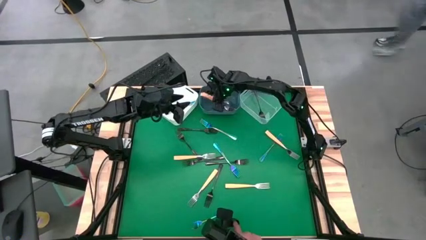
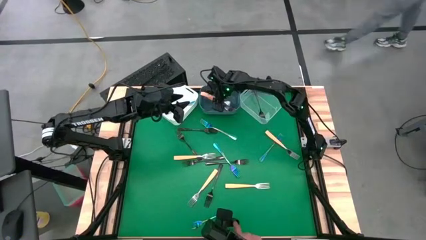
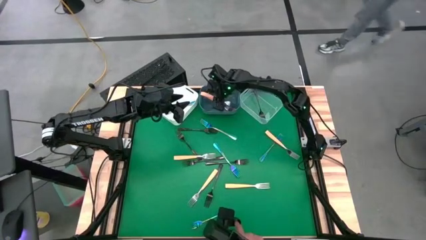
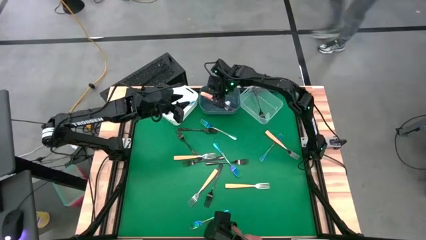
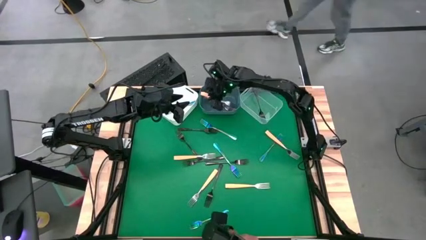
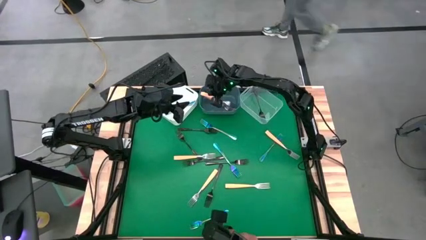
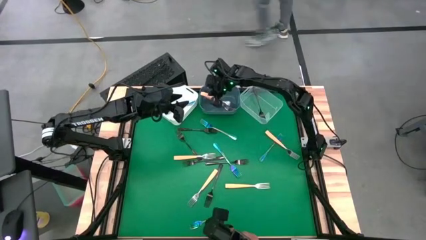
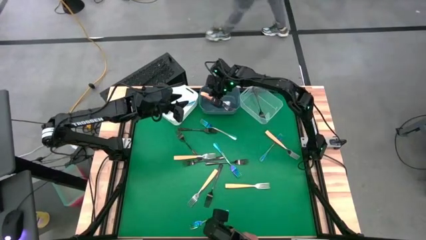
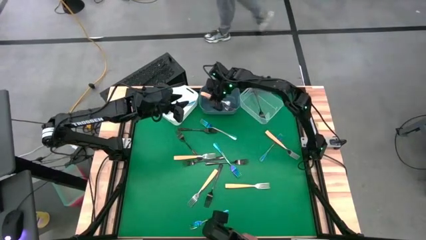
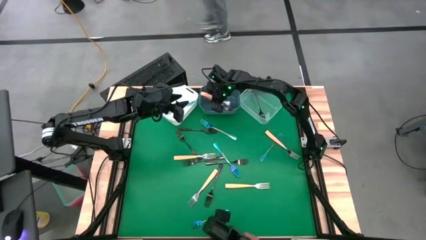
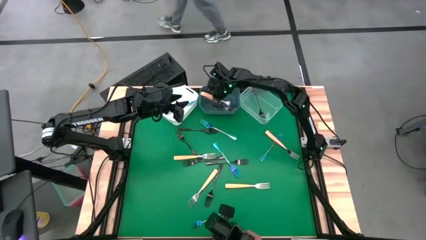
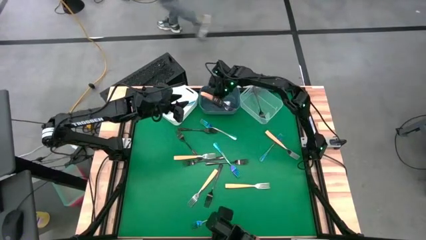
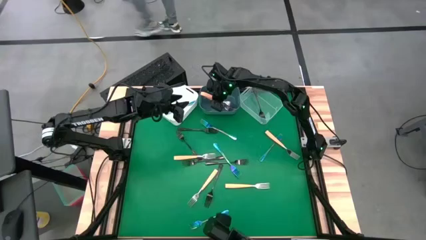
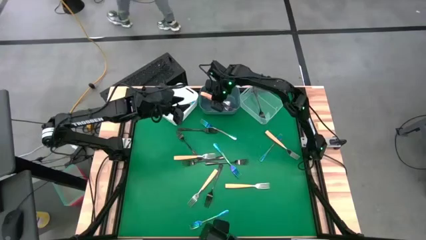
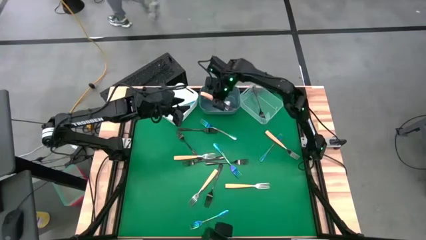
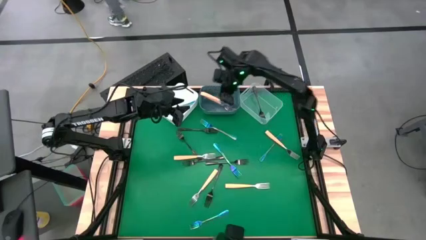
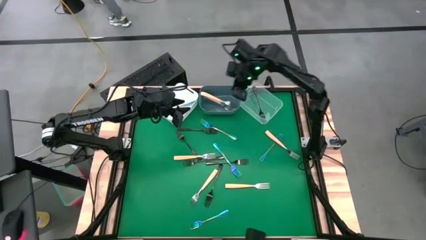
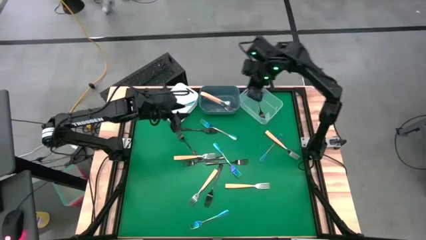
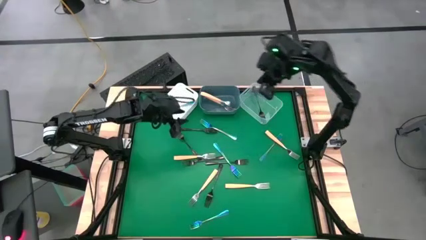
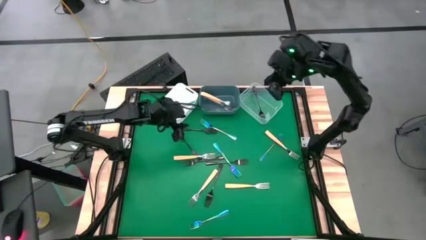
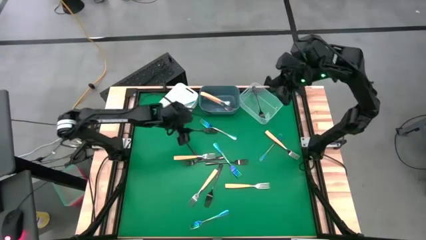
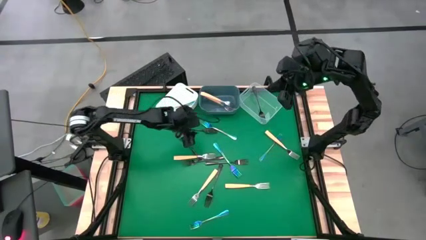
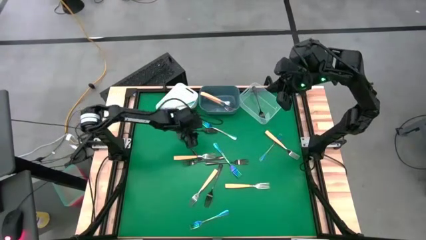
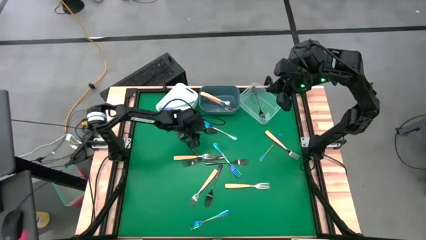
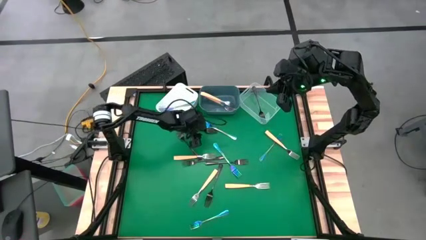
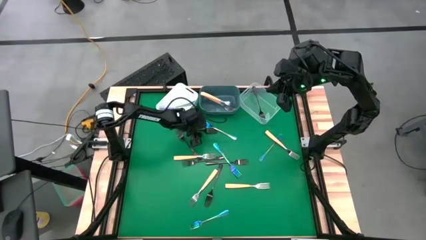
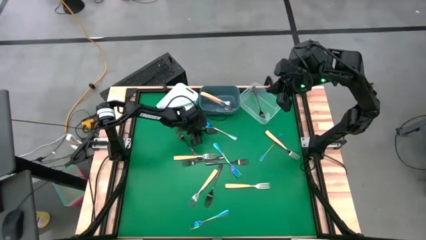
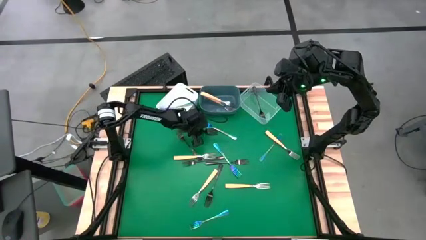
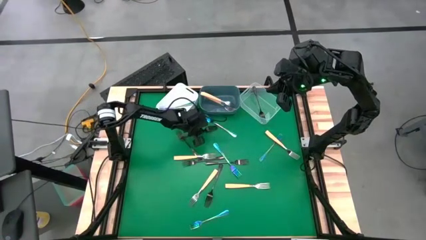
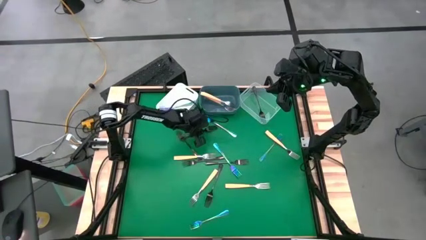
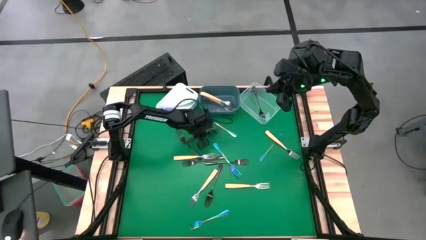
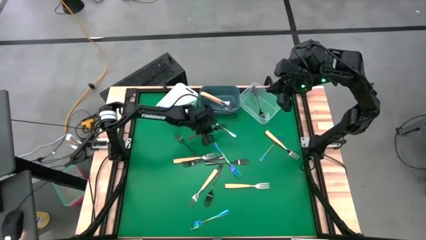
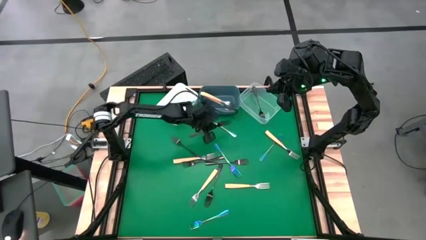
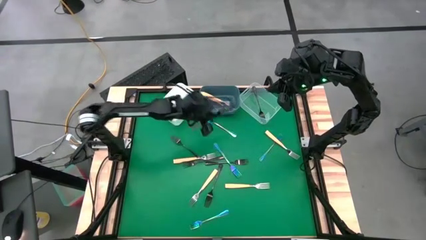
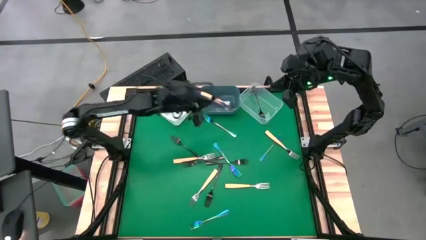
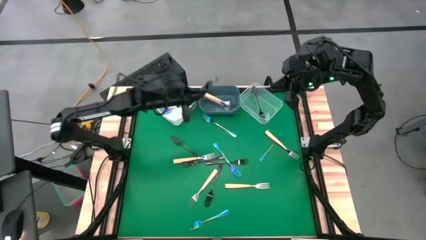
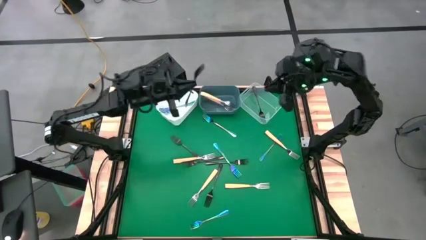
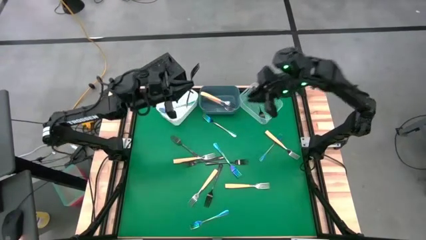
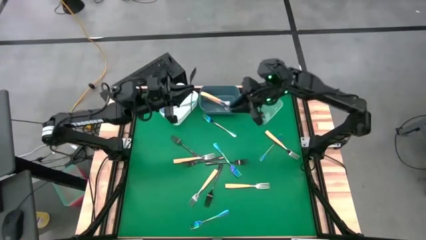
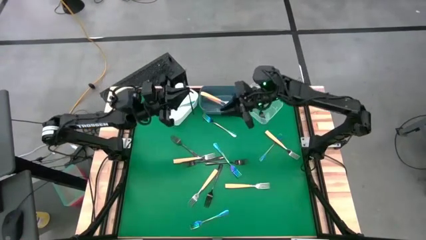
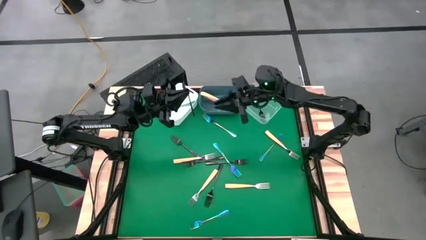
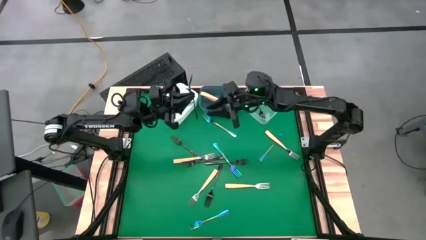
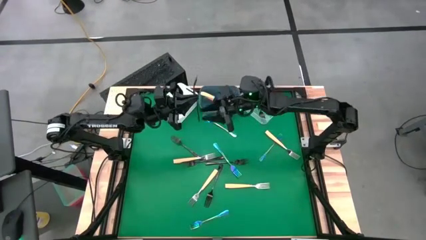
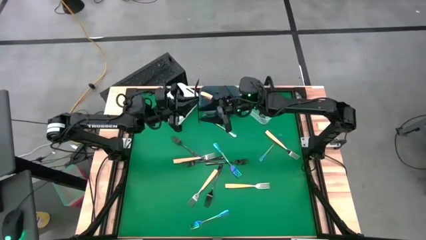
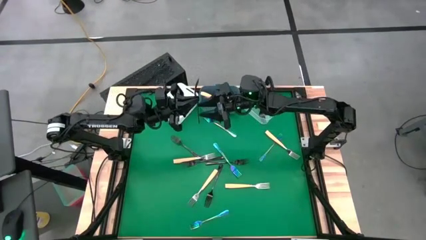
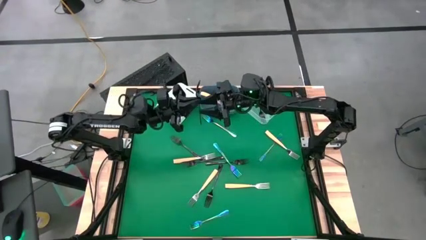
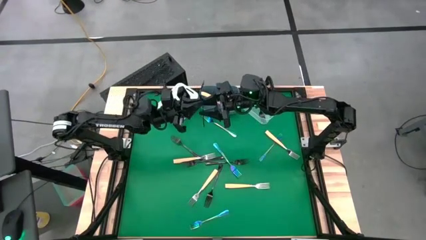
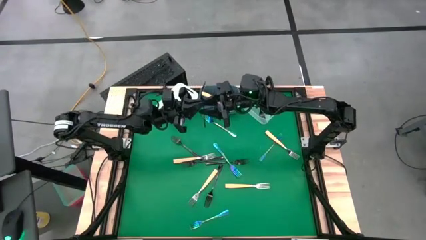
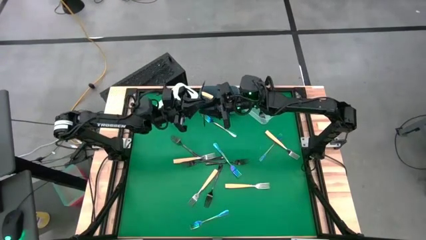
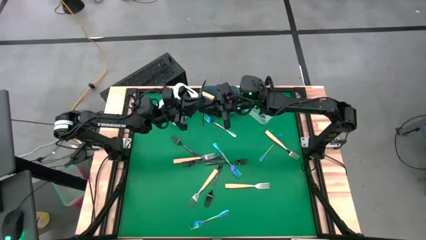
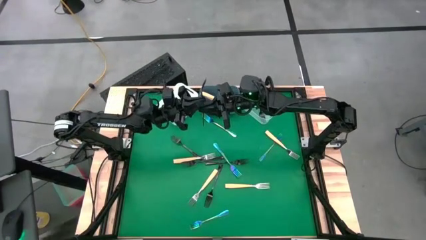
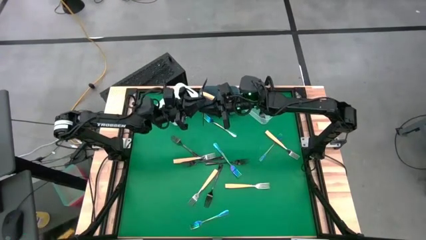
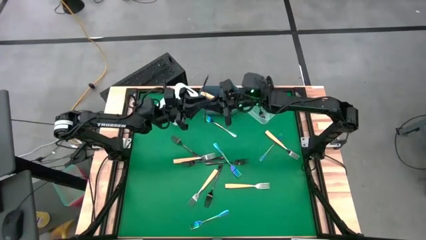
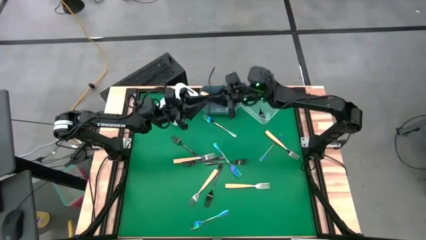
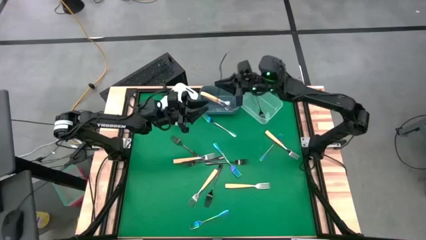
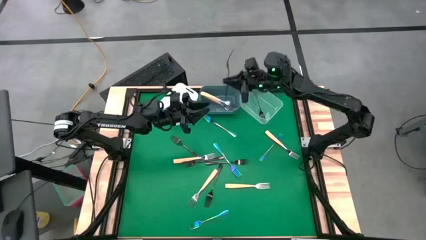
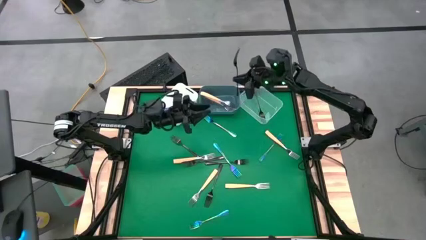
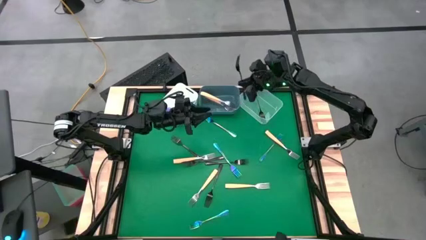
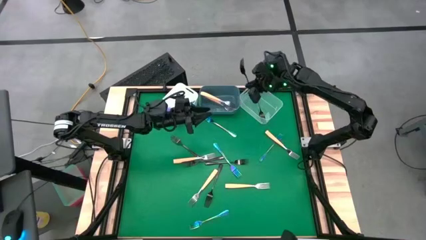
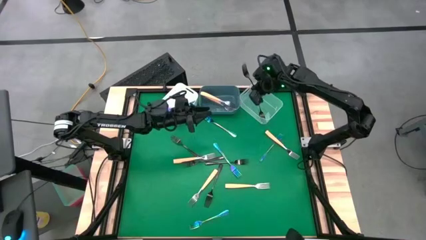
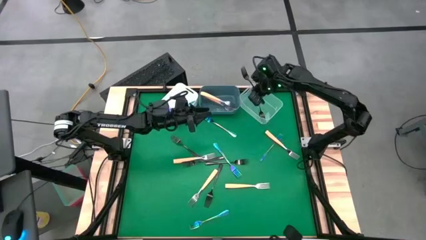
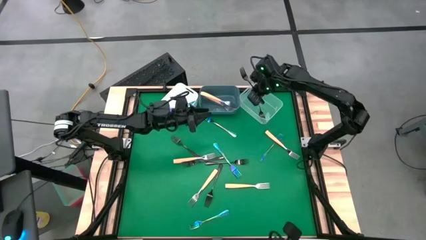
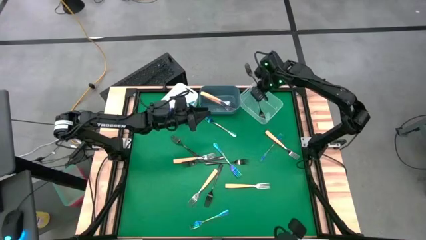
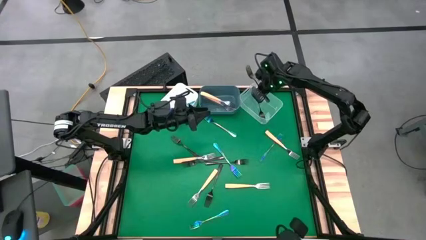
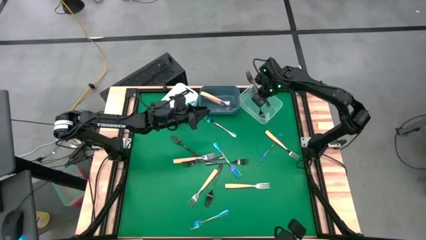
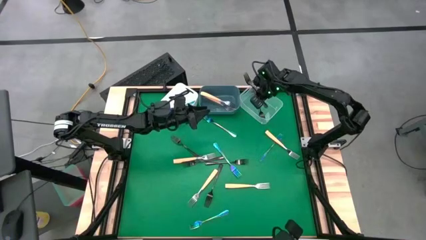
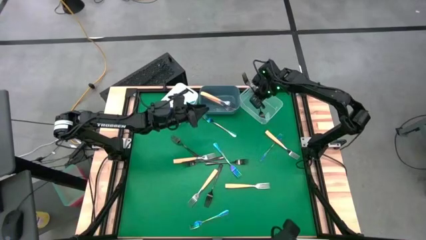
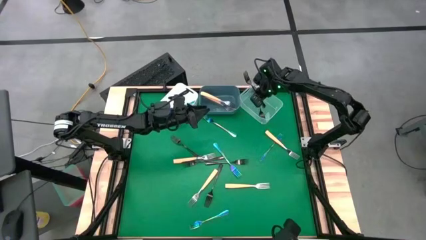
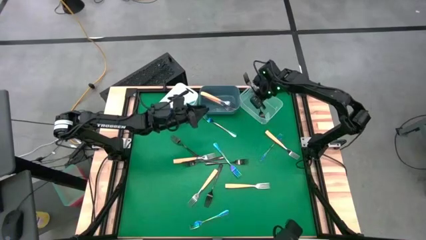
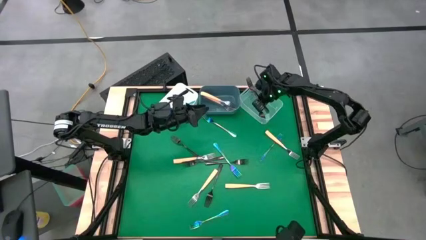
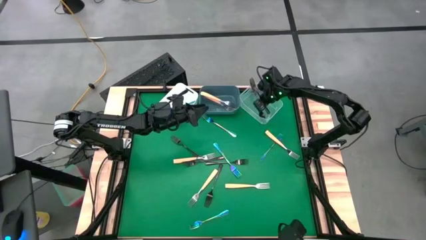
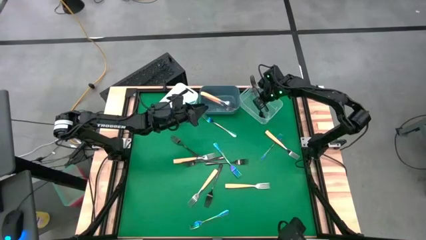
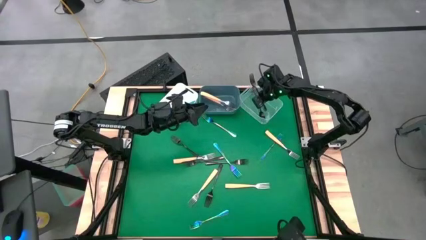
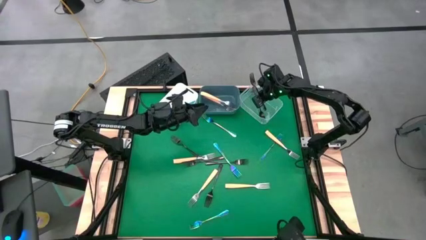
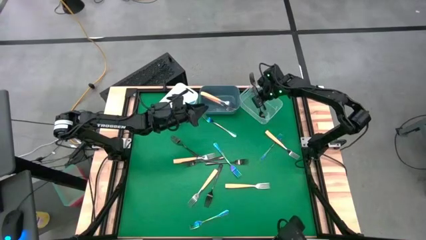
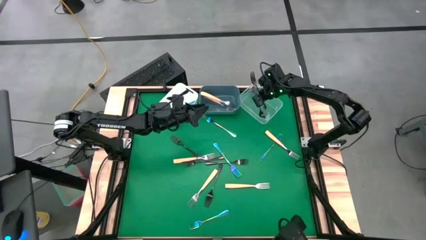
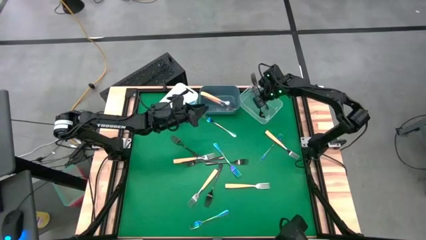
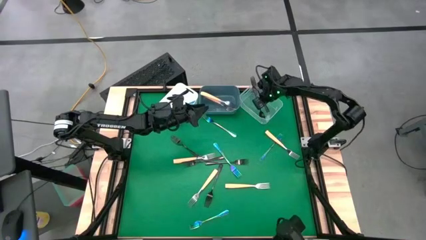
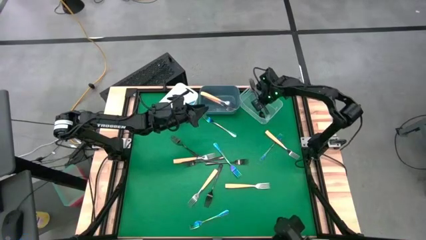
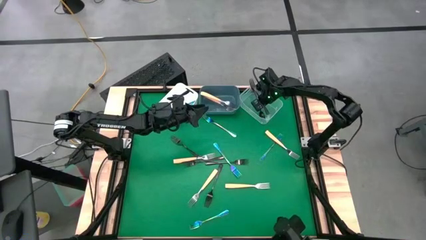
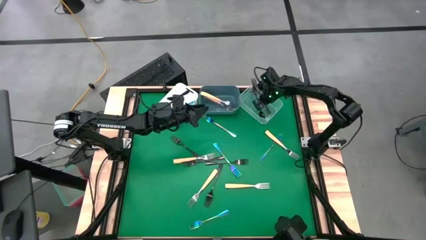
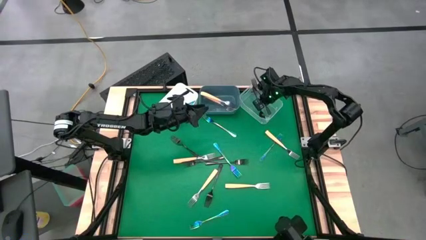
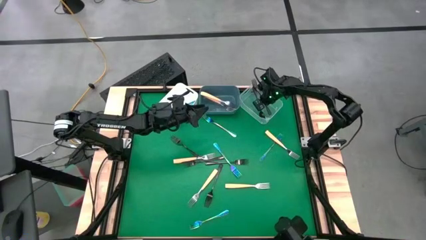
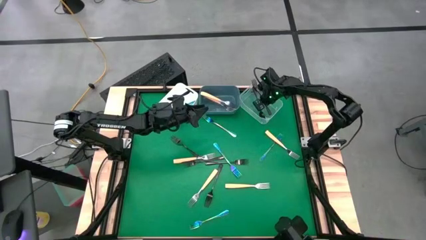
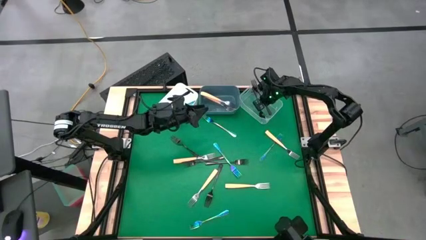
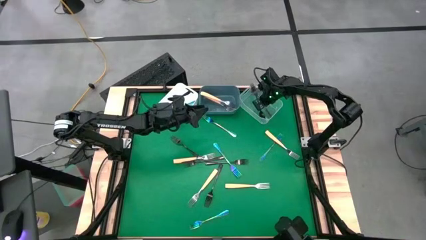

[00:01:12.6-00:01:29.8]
Task: Sort silverware by color (type)
Put the black fork into the transparent bin
